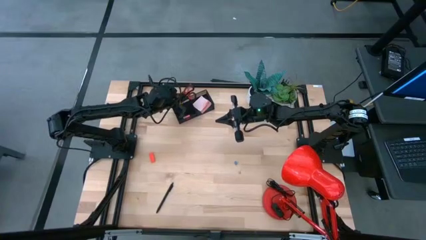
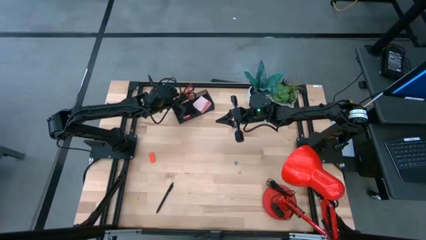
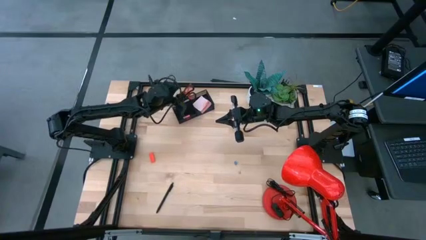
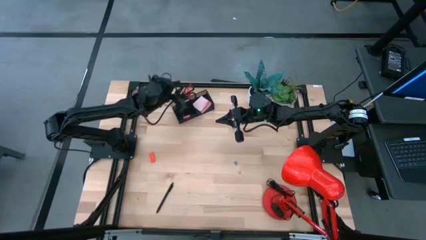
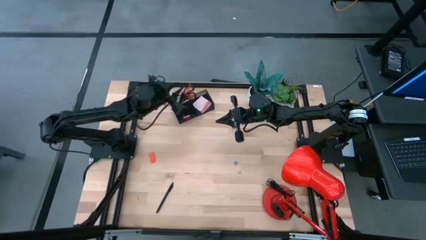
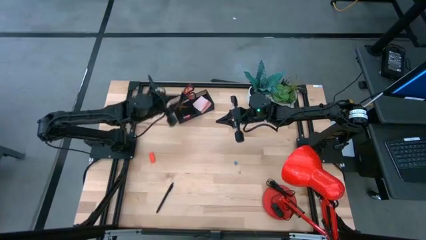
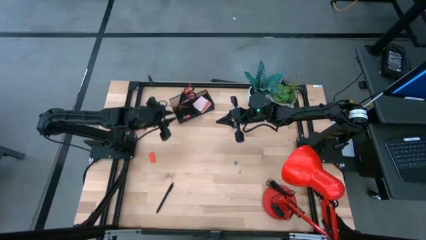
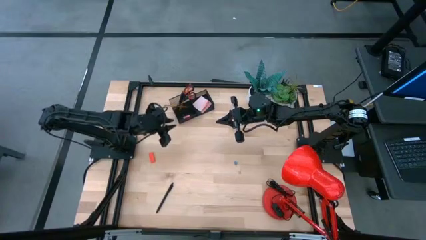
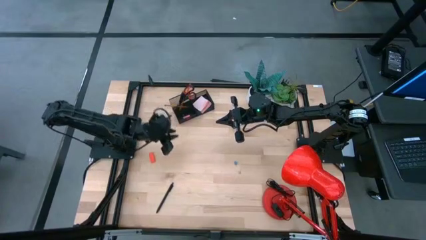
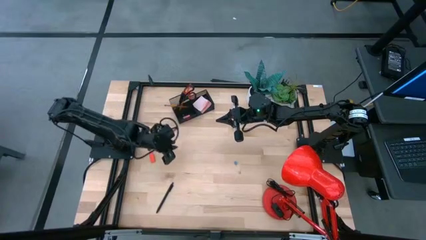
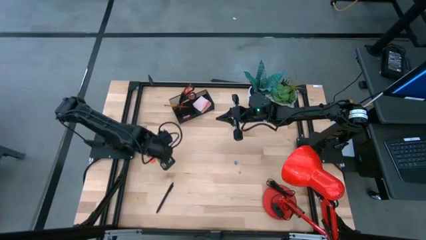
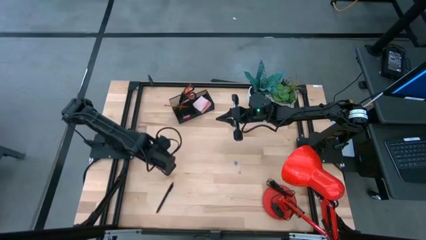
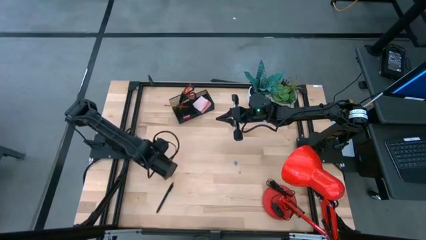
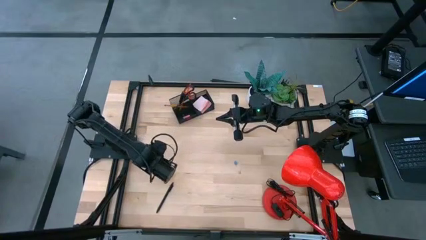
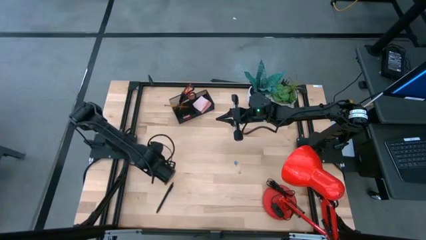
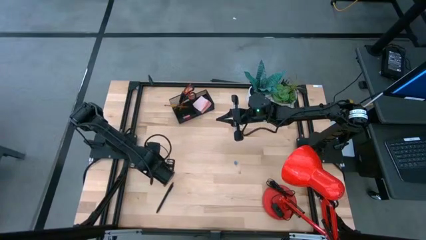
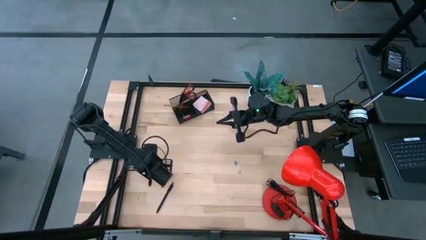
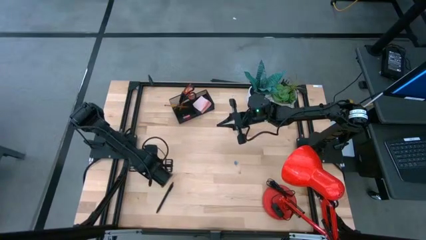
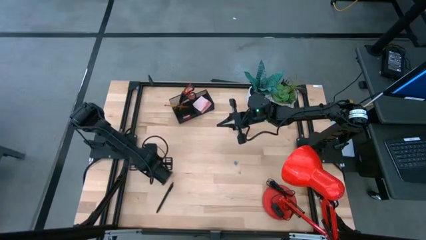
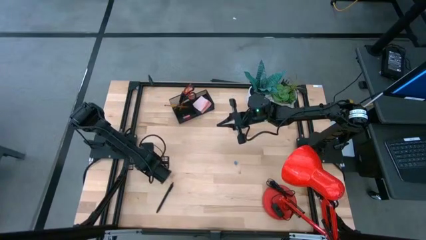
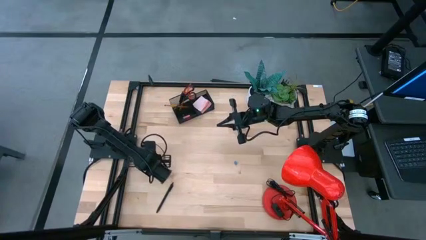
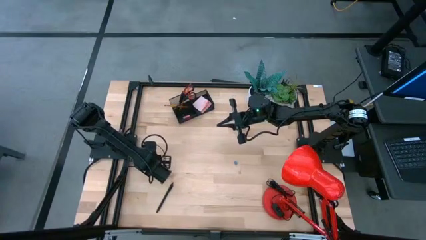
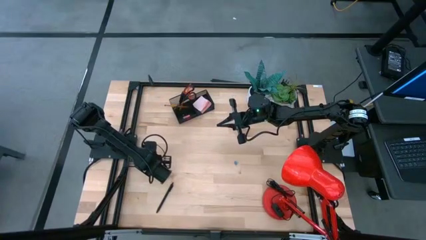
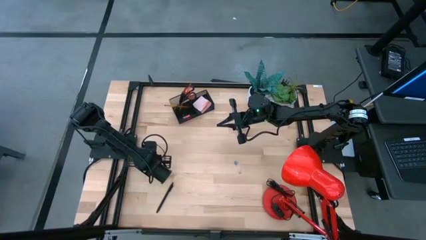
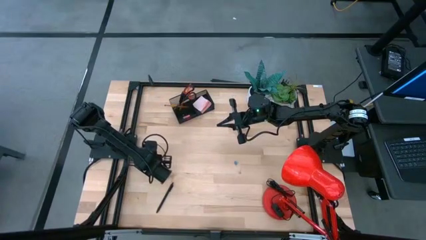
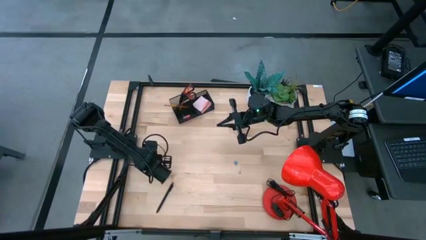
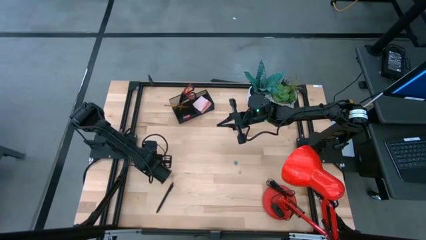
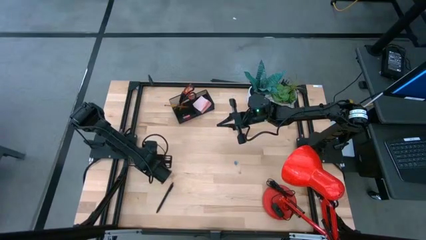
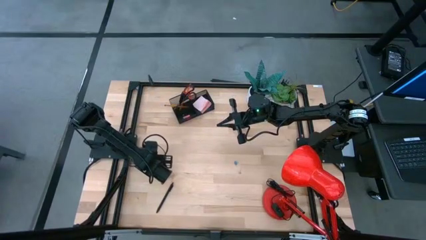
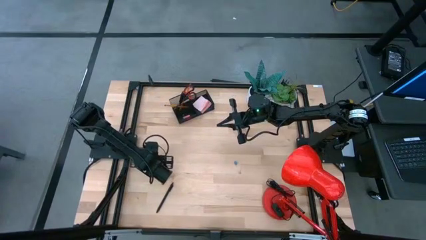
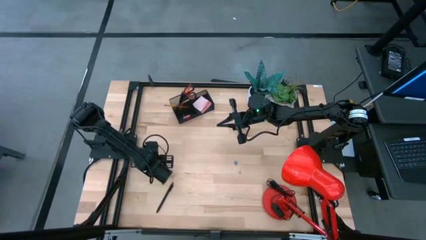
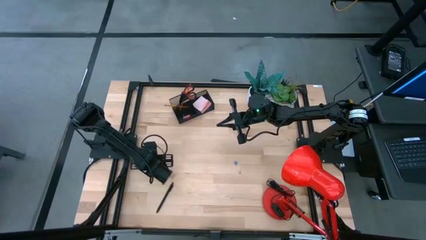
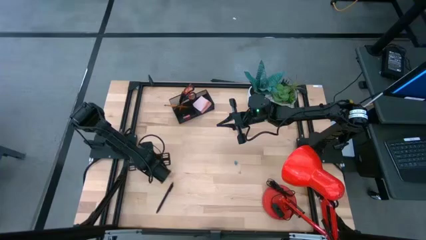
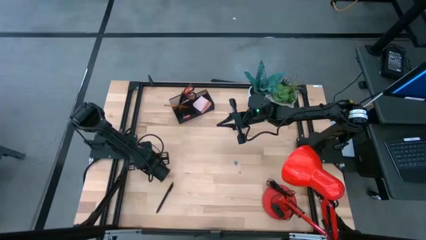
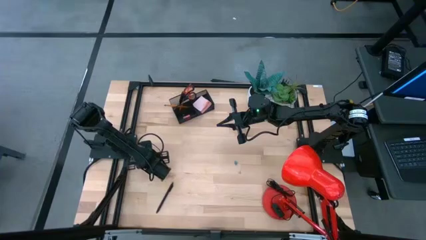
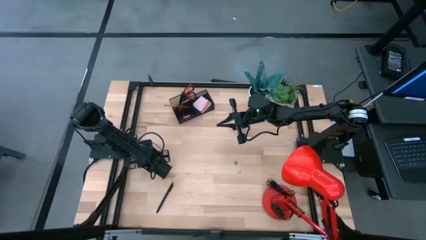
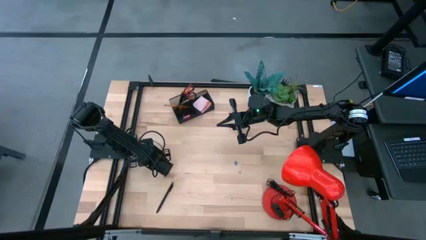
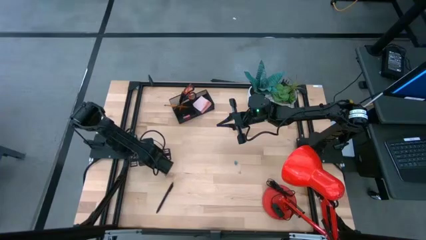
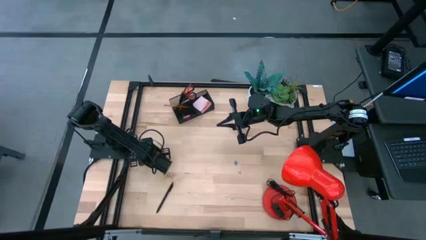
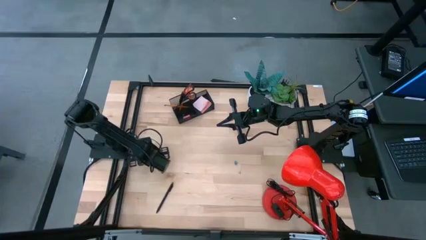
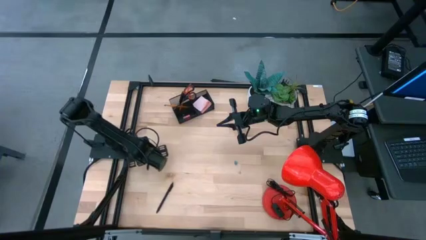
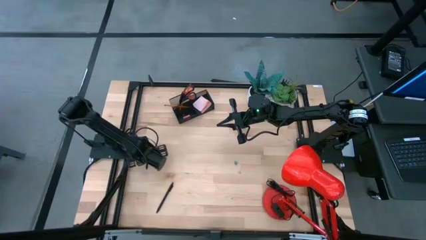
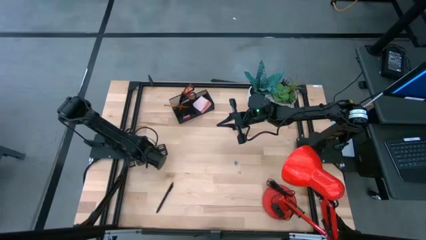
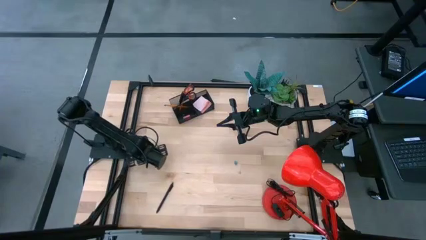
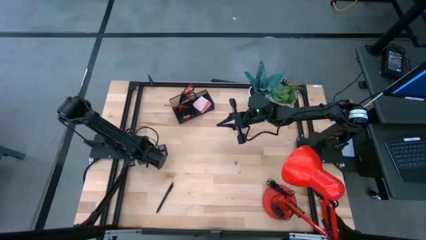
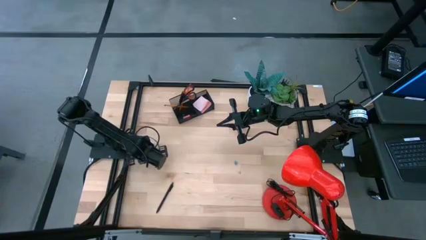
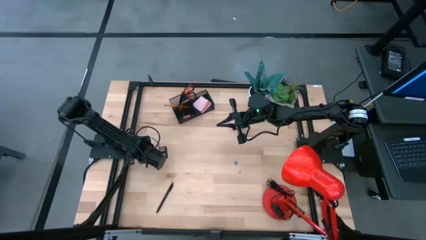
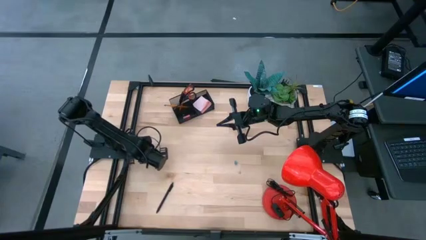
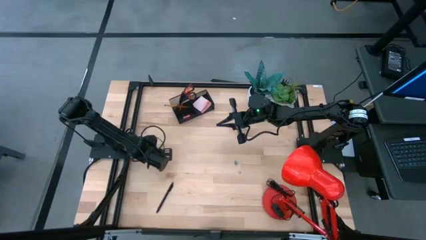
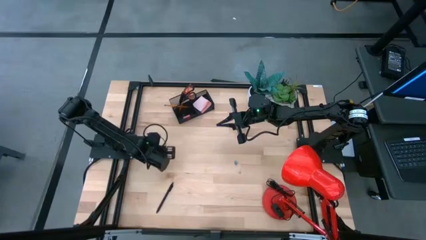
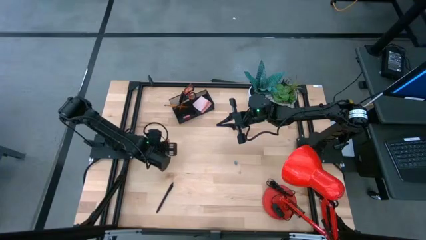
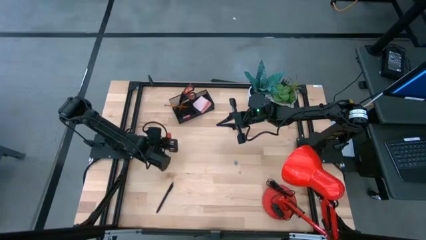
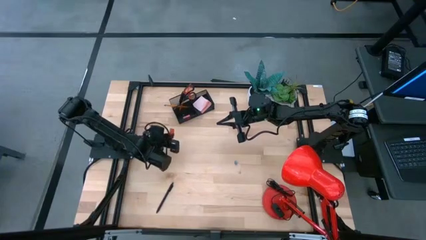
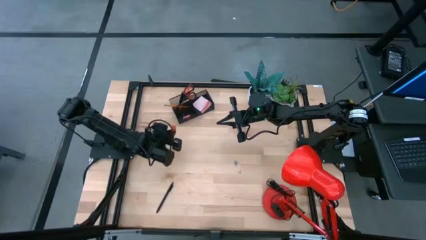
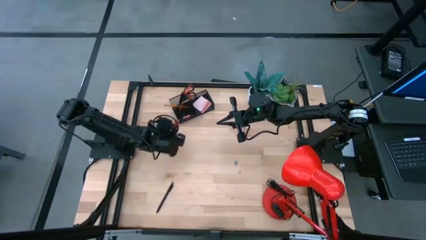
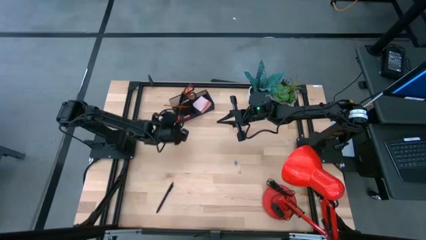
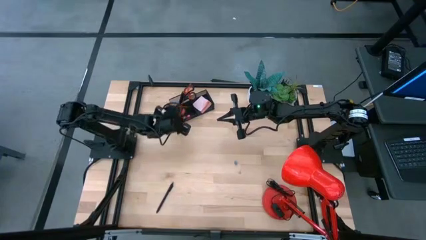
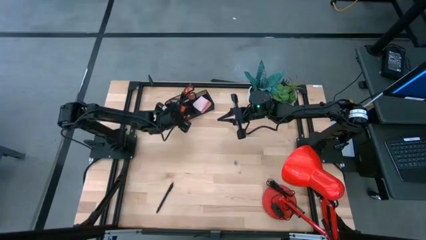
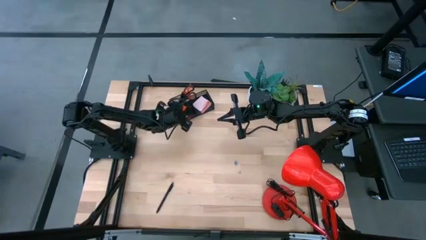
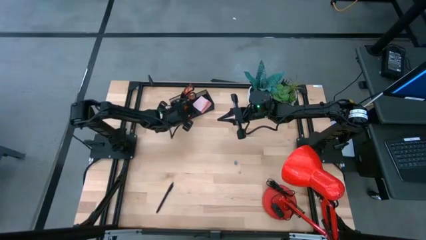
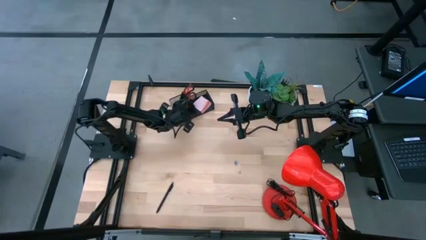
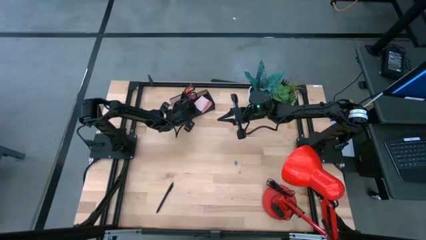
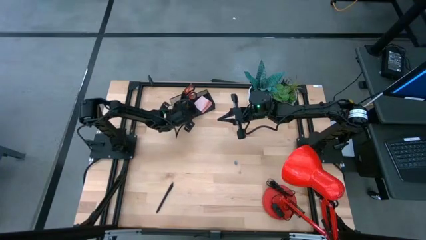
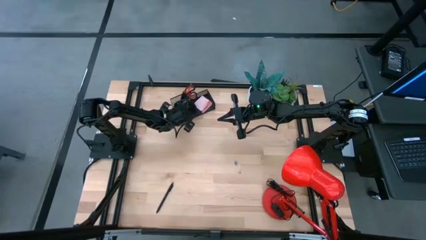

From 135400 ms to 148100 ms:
Task: Pick and place office supplies into organizer
Put the orange eraser into the desk organizer
